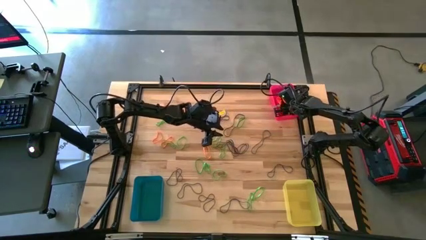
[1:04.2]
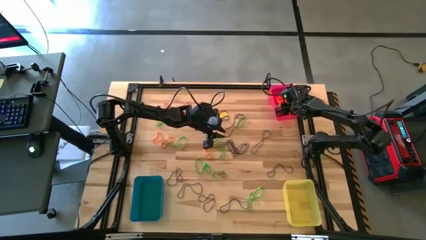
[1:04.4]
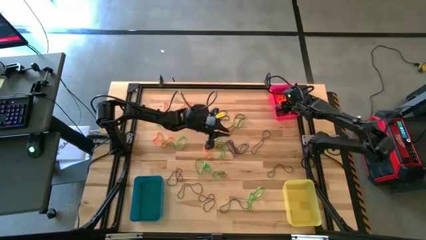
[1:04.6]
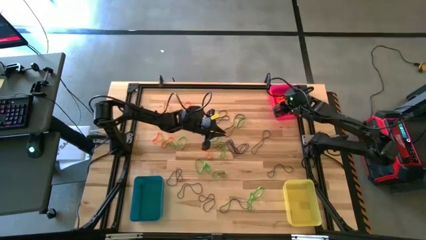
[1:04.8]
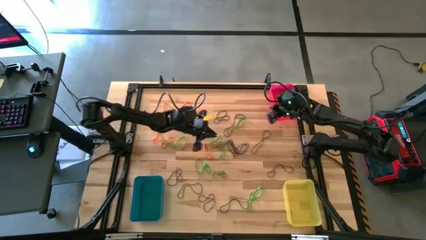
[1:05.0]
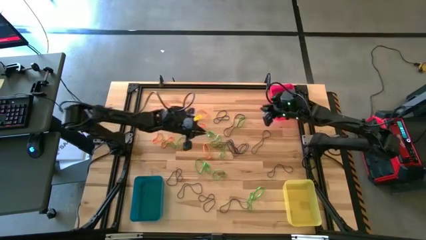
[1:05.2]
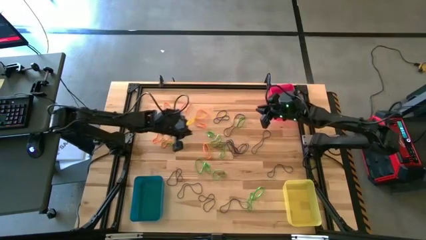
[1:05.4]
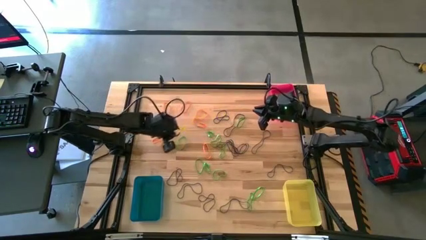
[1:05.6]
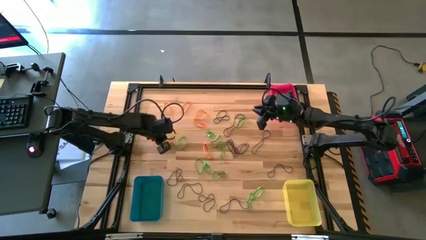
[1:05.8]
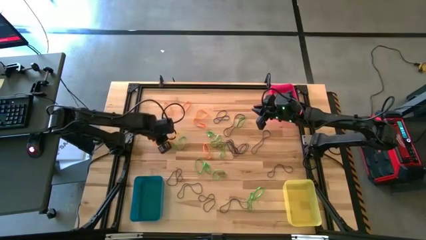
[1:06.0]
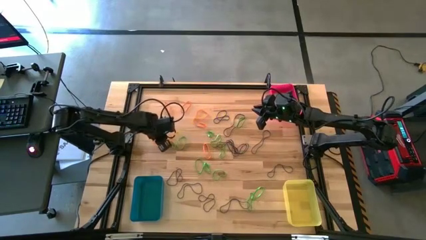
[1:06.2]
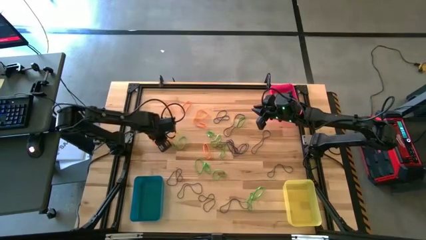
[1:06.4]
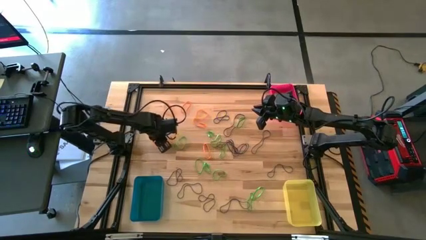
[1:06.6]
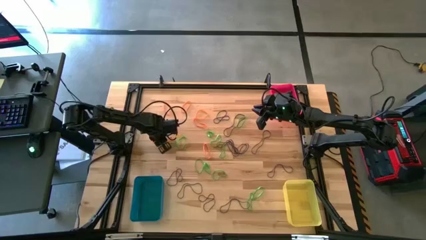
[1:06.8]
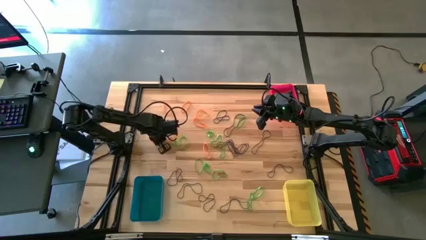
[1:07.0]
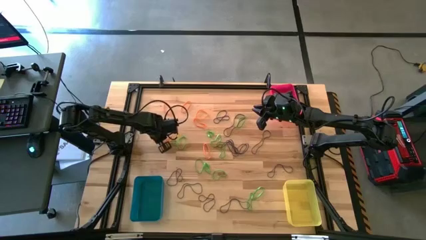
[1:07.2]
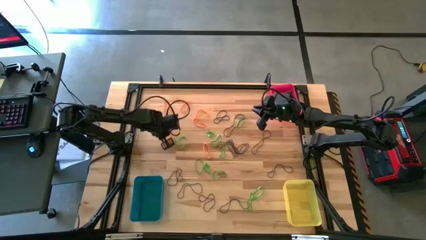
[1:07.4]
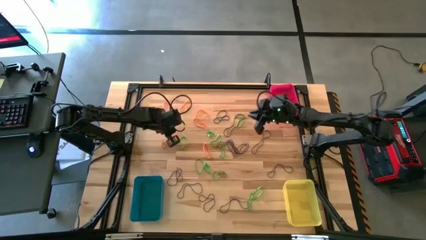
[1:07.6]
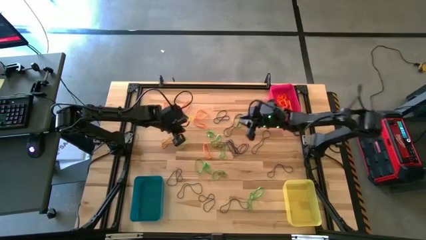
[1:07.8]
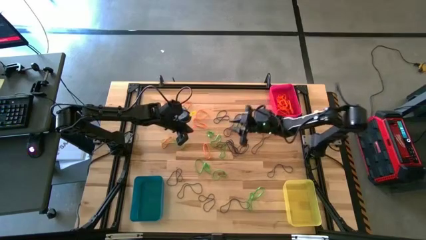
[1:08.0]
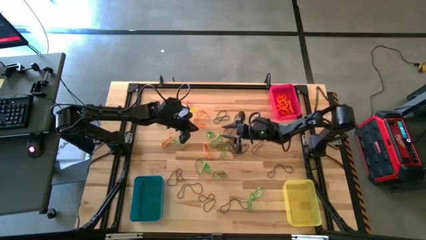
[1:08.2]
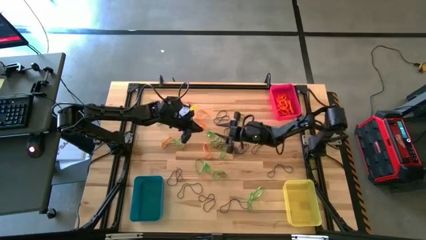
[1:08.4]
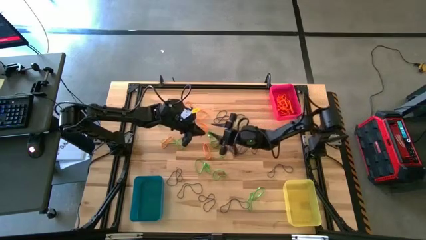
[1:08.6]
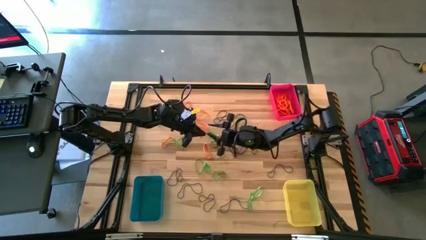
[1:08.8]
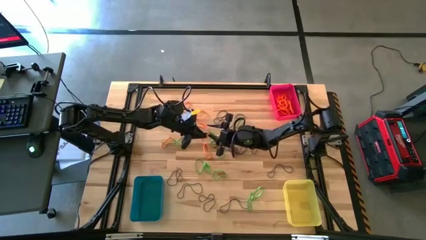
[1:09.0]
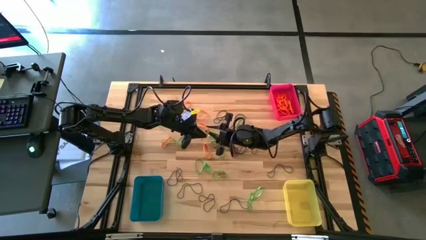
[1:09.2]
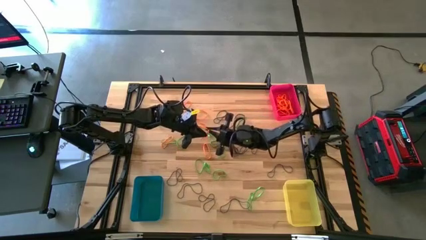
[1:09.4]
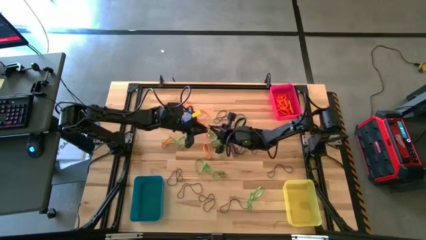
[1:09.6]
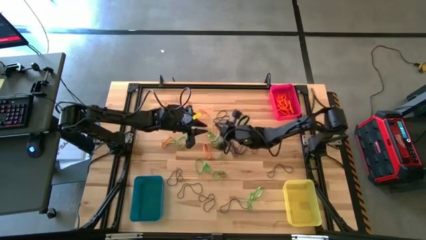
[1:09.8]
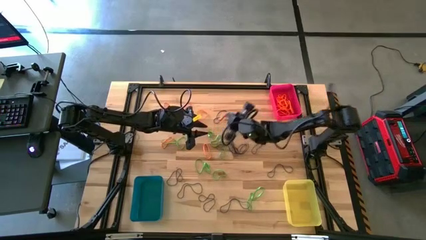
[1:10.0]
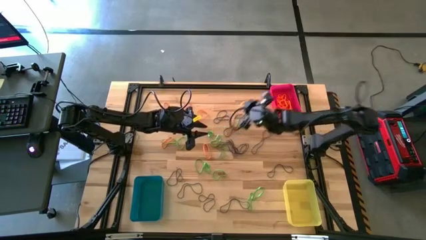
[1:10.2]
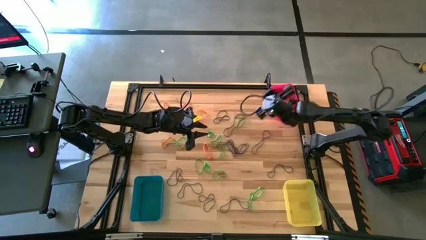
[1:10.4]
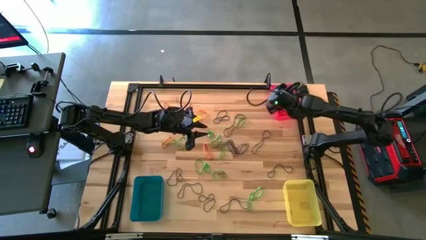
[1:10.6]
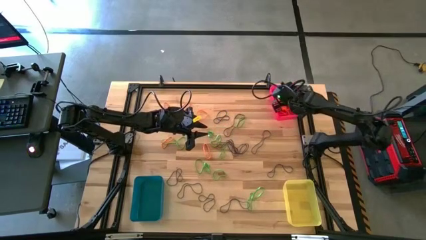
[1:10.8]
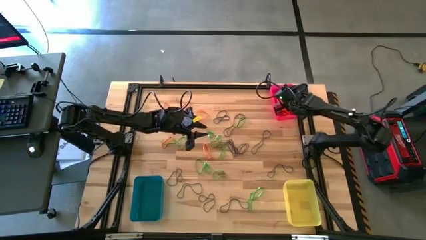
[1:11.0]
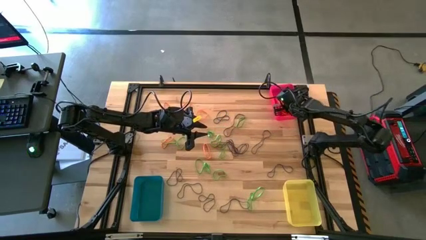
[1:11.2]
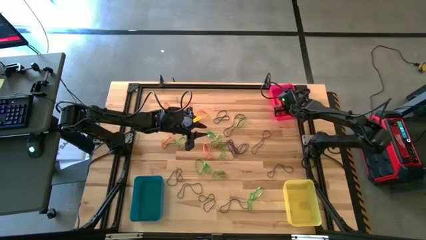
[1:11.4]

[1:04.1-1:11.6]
Task: Sort rubber bands into baskets
Put the orange rubber band into the red bin

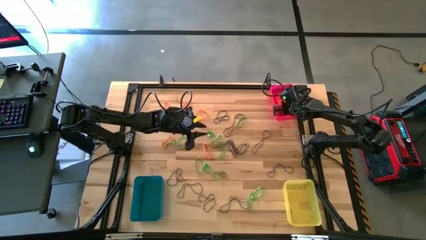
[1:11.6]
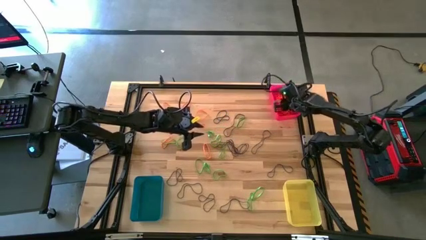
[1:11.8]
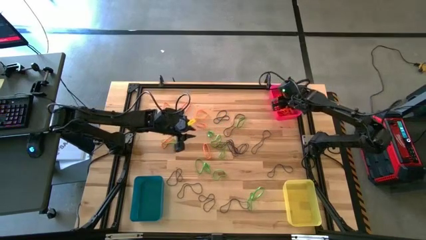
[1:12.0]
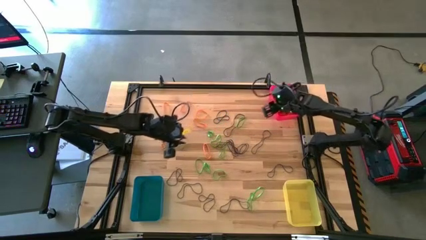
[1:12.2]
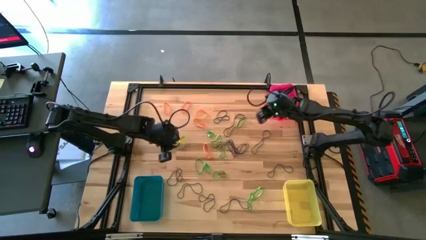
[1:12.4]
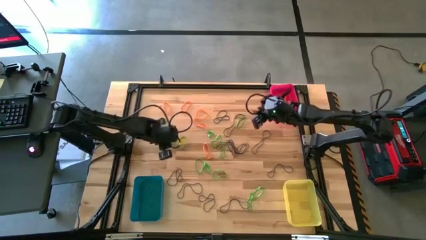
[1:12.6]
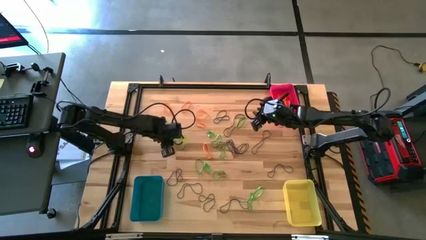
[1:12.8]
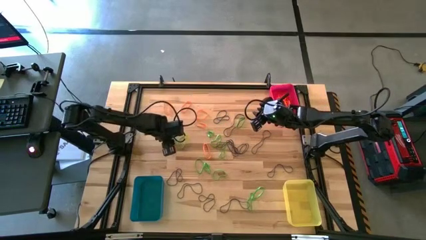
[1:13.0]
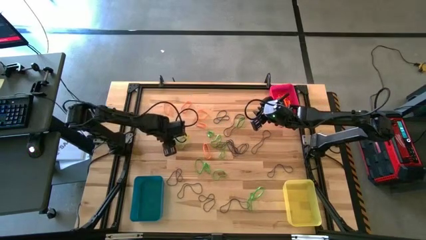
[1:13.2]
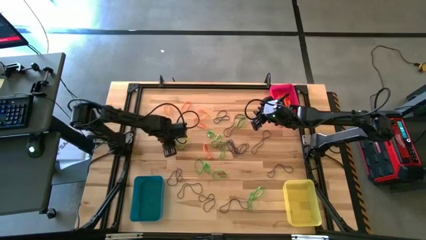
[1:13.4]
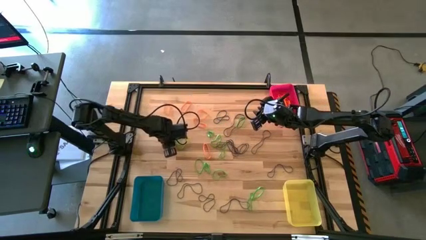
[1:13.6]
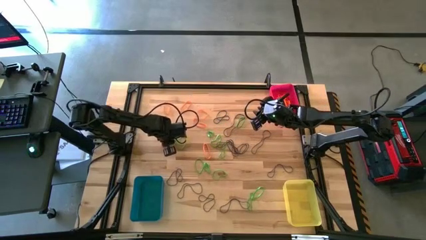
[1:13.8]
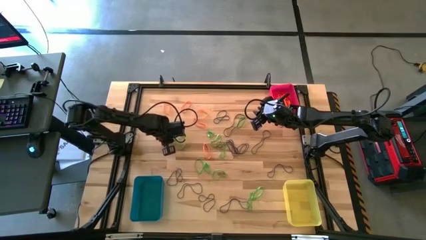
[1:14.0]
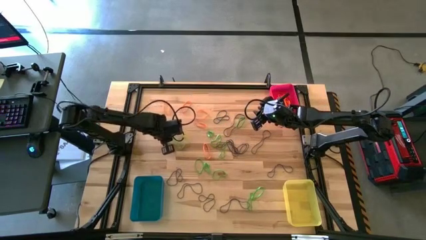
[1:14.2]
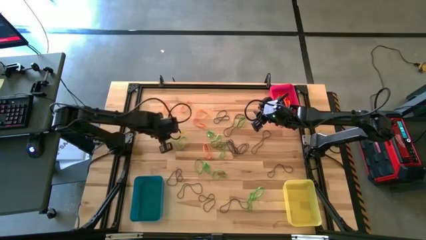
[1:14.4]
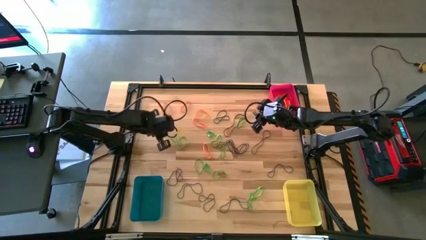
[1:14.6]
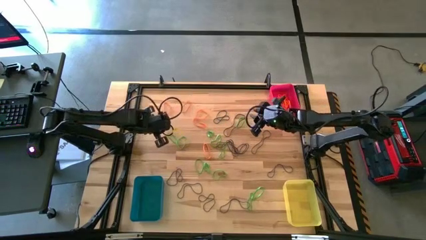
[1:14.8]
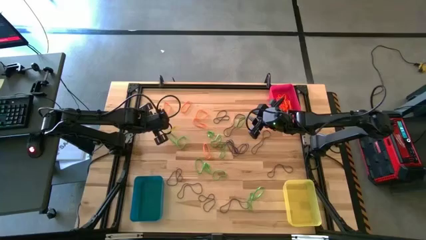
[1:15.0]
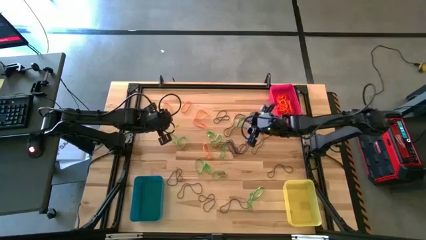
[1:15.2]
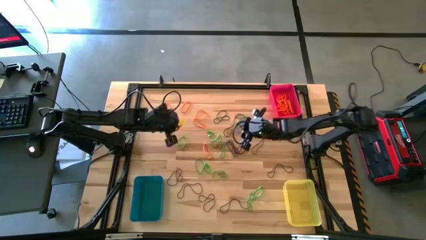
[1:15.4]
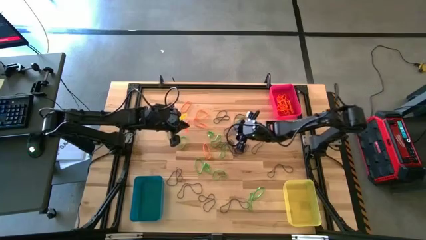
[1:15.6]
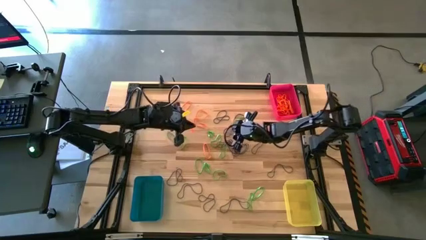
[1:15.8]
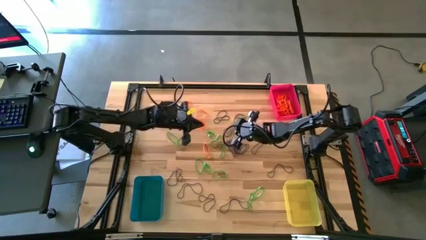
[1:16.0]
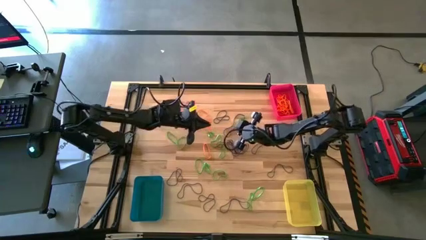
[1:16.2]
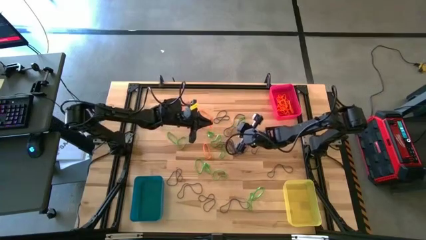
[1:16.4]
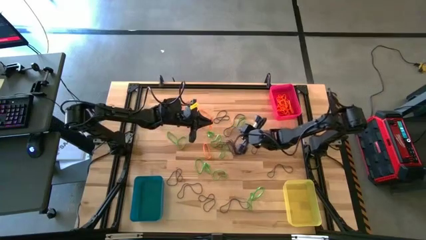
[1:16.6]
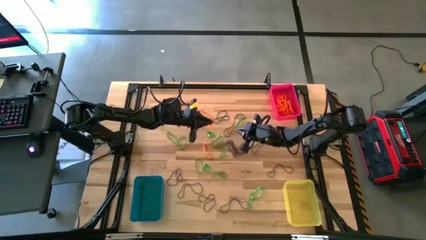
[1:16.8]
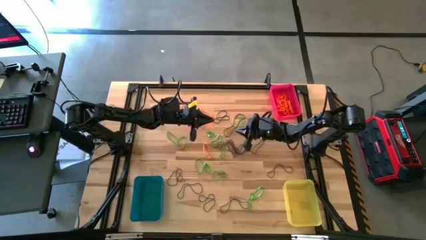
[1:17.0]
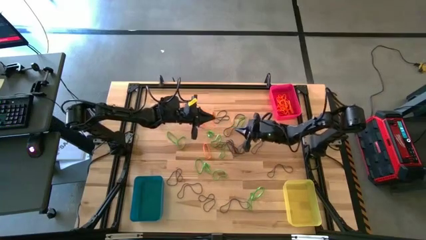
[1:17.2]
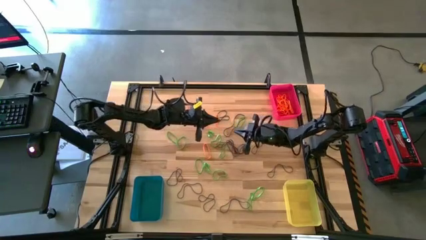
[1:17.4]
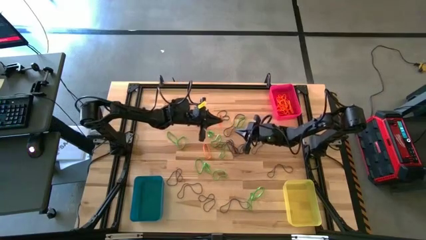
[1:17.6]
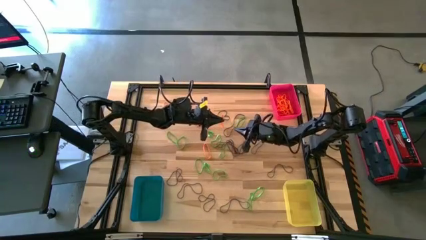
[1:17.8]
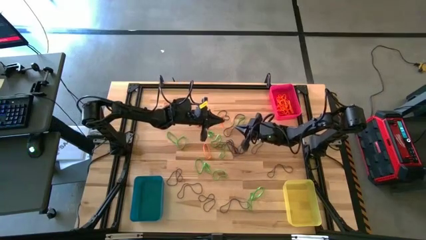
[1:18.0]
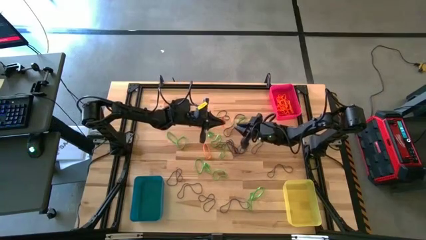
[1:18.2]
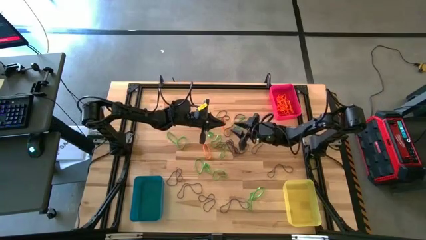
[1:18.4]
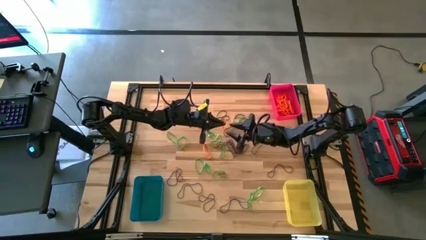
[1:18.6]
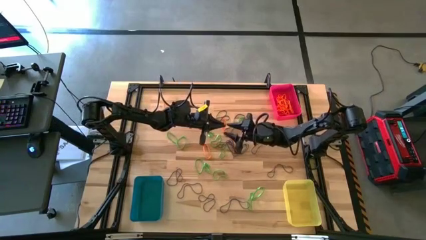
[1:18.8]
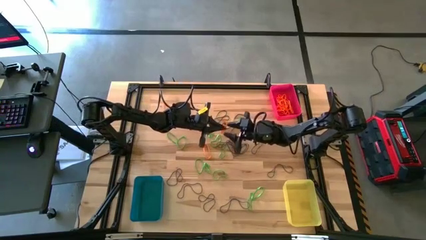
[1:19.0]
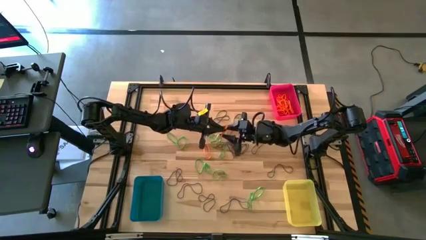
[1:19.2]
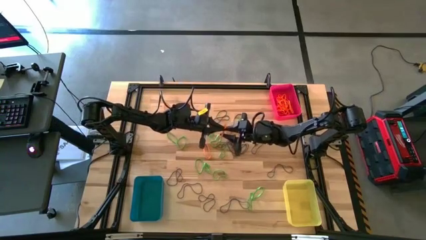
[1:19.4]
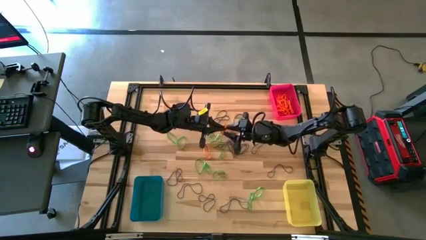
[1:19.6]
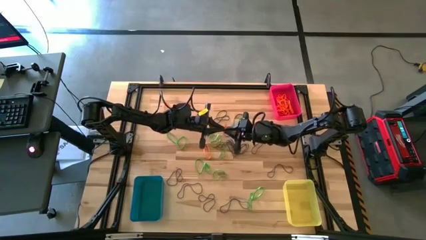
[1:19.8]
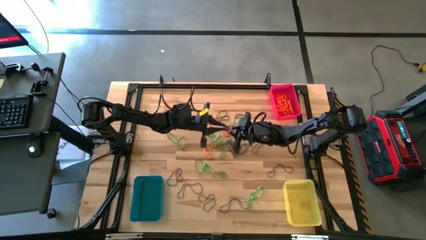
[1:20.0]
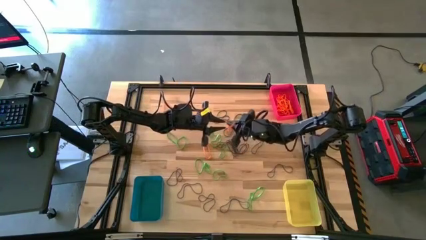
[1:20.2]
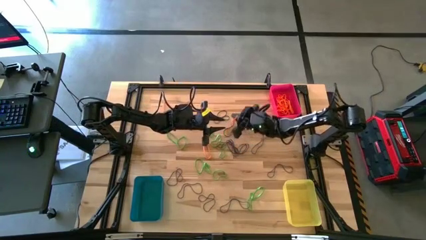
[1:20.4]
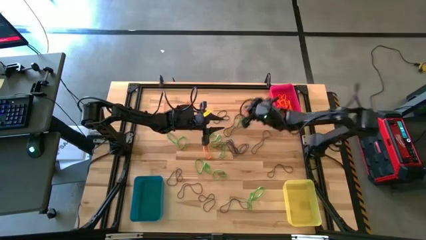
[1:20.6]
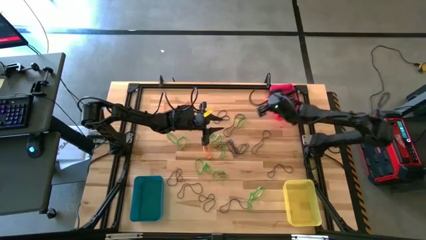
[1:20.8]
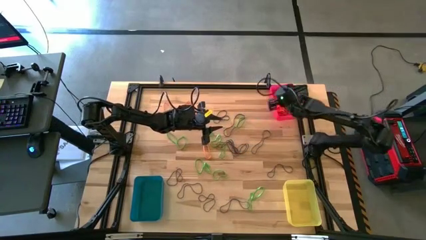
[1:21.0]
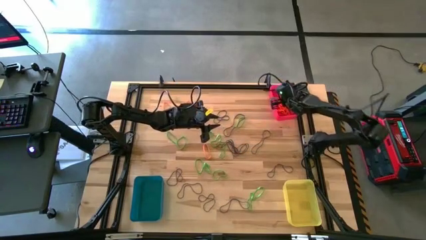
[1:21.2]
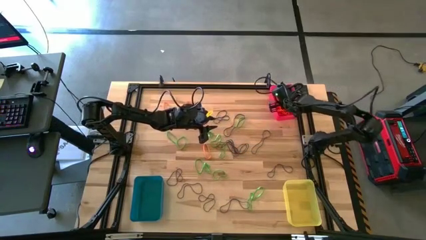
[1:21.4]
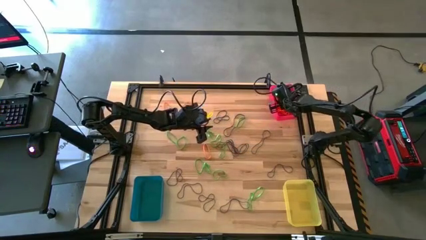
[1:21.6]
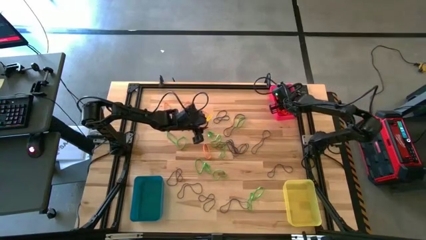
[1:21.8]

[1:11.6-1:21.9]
Put the orange rubber band into the red bin
